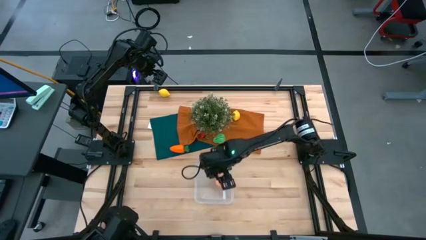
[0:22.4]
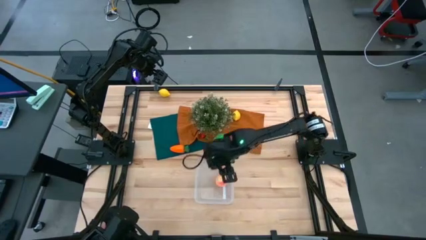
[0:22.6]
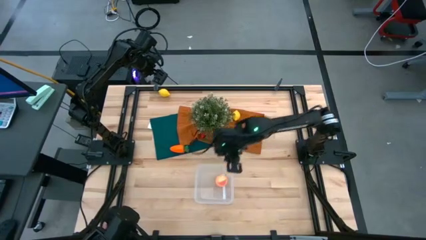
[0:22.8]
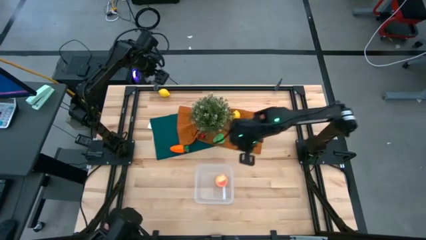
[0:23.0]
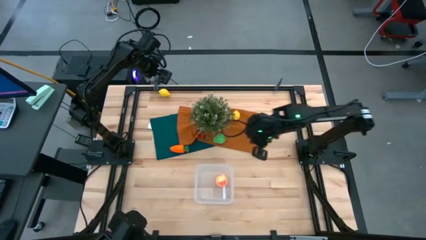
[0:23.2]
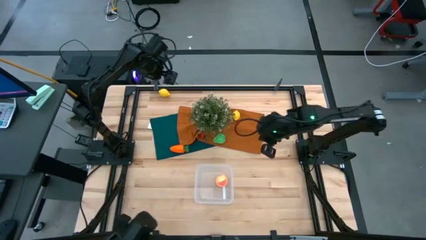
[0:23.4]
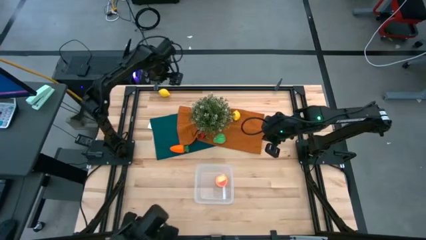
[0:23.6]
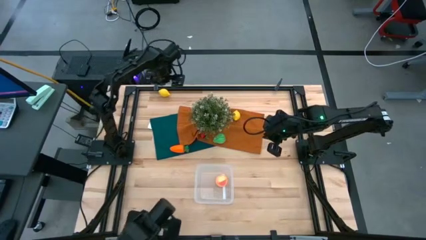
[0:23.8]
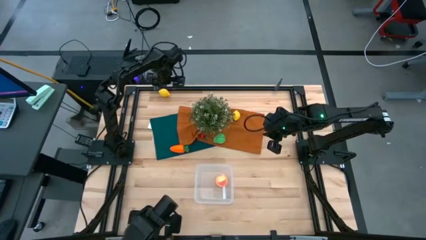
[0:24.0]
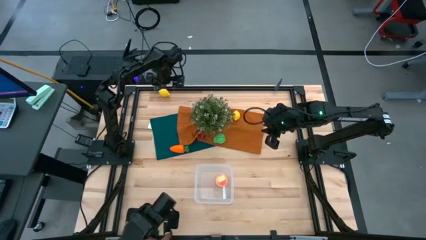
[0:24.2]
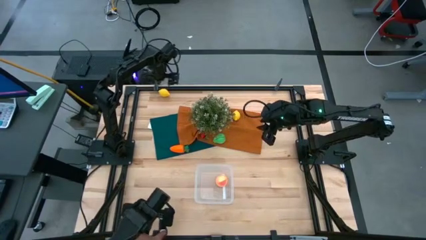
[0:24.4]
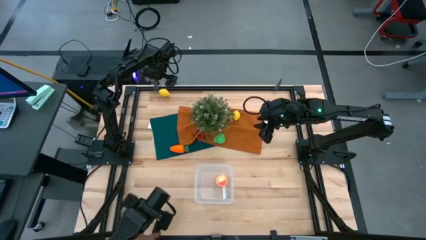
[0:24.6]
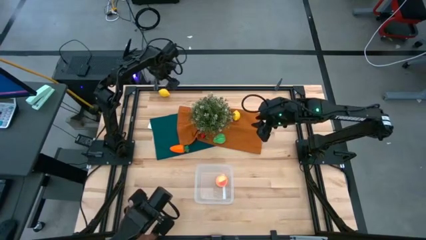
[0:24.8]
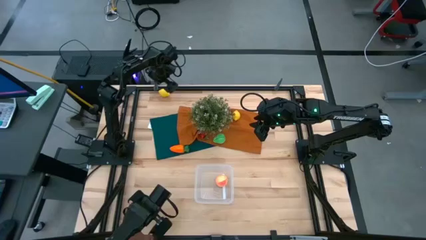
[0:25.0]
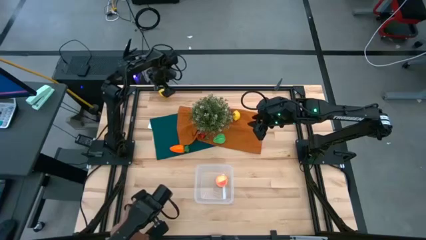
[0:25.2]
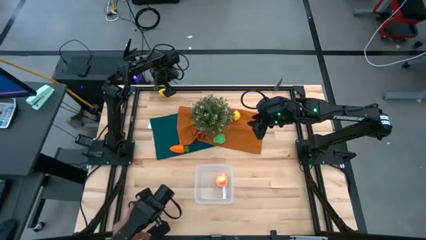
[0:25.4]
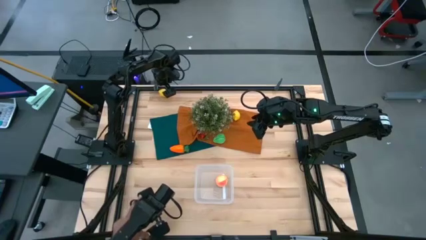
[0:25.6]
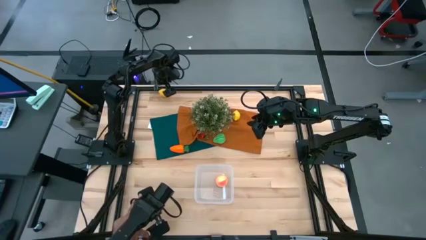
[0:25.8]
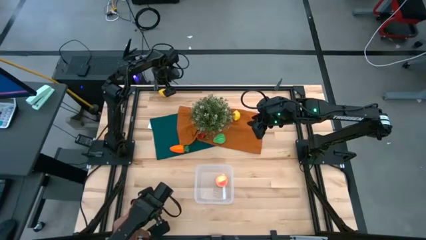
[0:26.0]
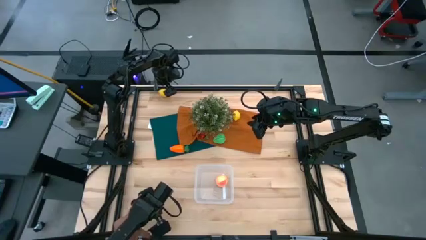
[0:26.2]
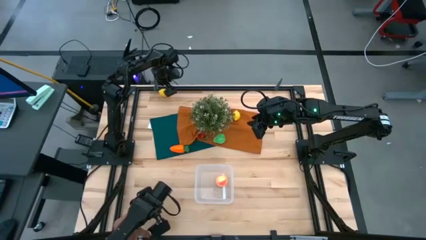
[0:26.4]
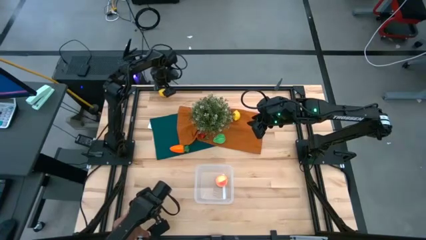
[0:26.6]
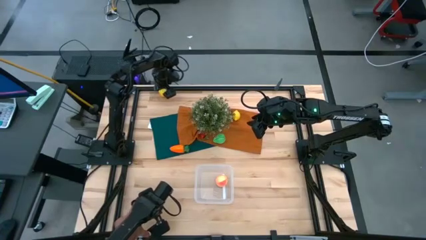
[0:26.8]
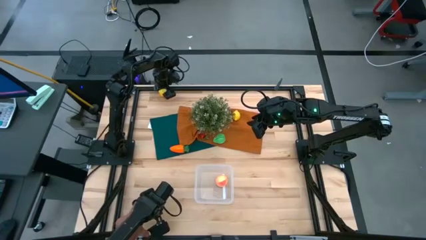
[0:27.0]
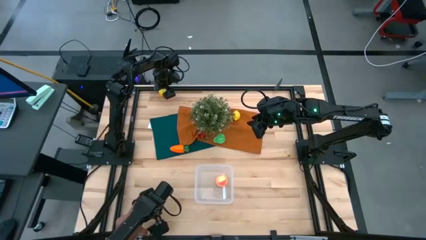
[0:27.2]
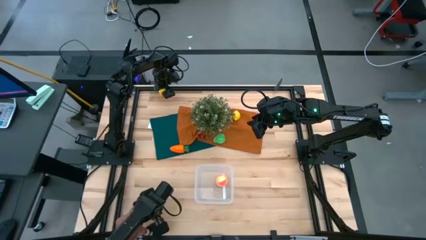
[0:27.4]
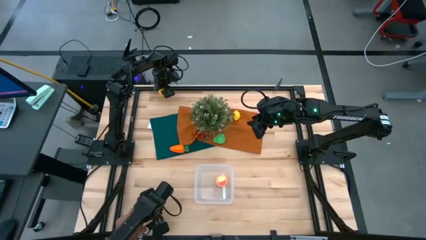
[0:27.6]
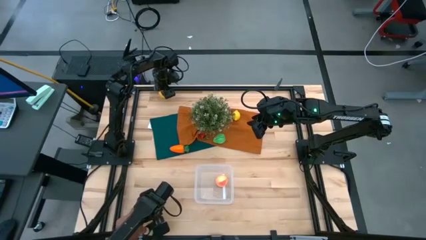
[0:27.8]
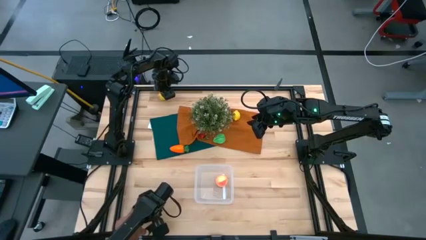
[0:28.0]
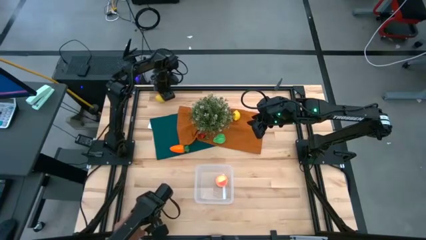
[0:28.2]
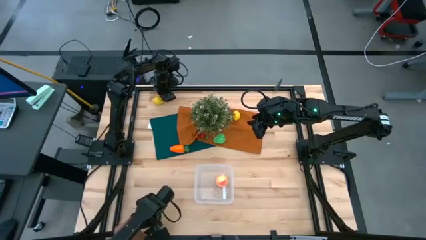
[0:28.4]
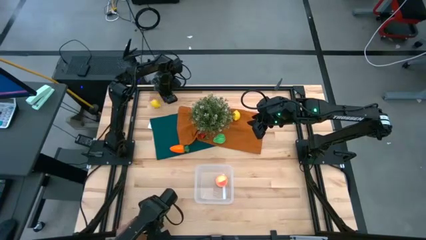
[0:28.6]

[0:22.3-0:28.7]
Task: Pick and placing Produce into tupperware
Put the top lemon into the transparent bin

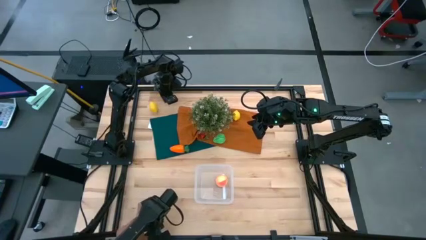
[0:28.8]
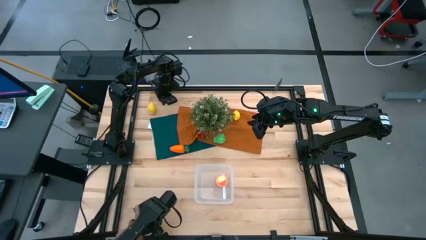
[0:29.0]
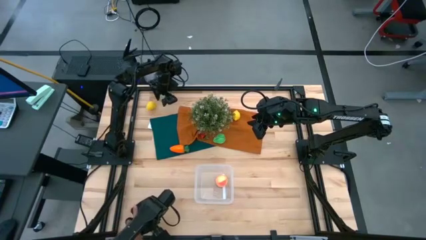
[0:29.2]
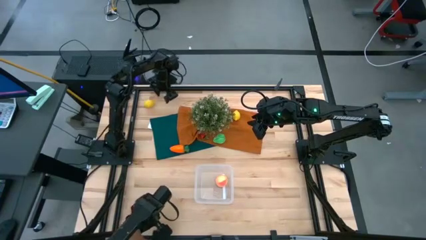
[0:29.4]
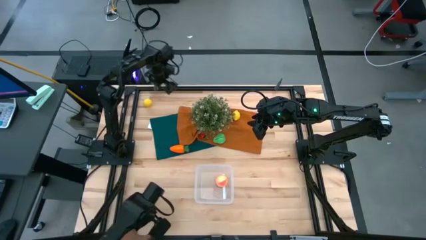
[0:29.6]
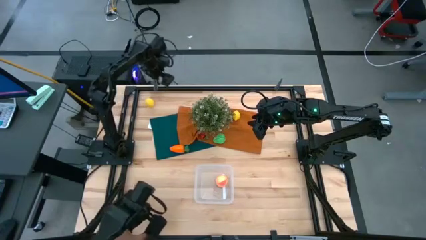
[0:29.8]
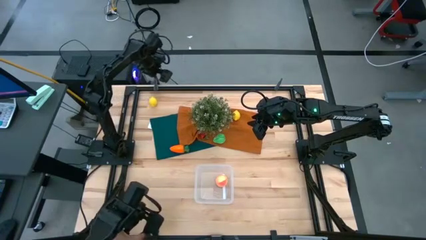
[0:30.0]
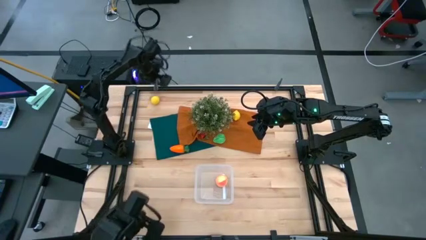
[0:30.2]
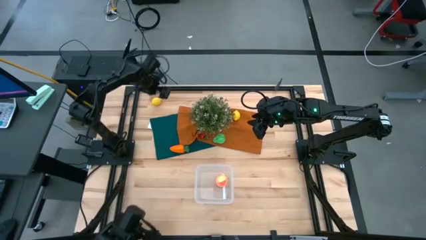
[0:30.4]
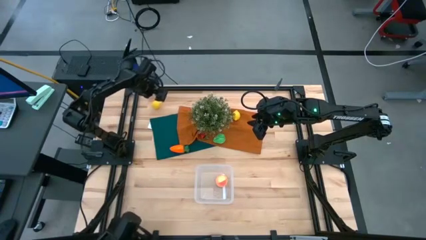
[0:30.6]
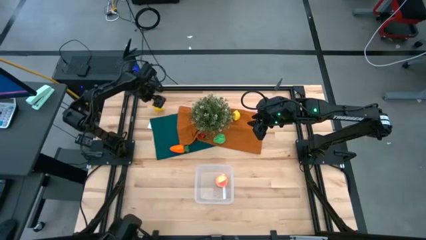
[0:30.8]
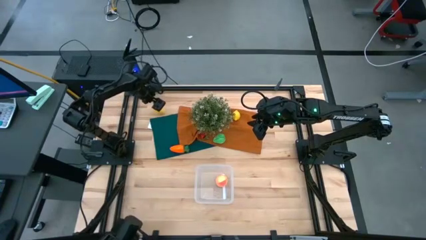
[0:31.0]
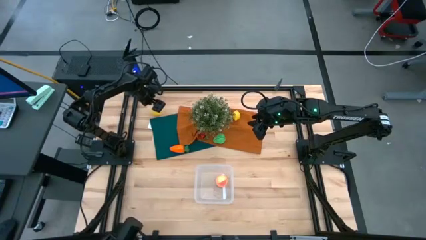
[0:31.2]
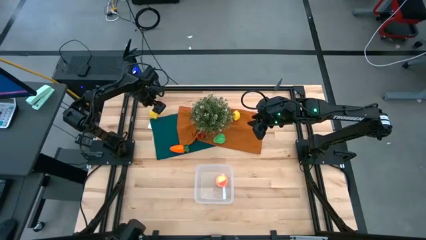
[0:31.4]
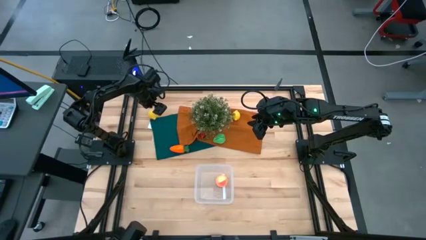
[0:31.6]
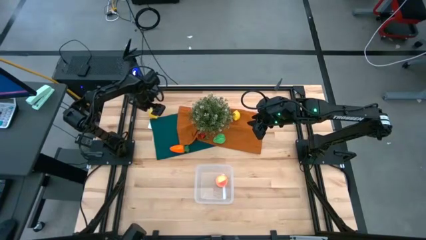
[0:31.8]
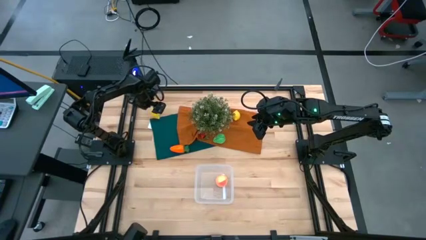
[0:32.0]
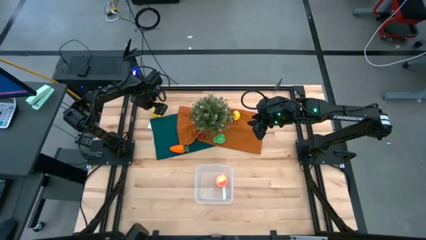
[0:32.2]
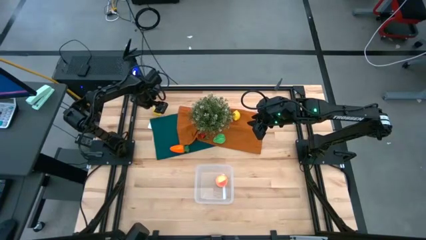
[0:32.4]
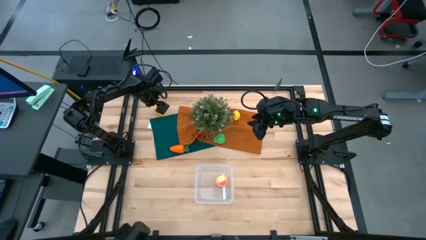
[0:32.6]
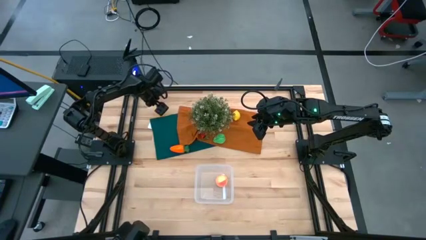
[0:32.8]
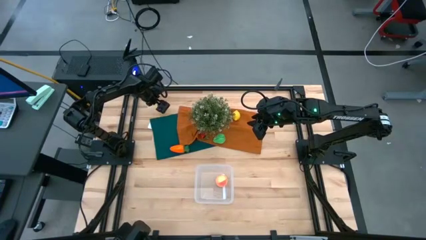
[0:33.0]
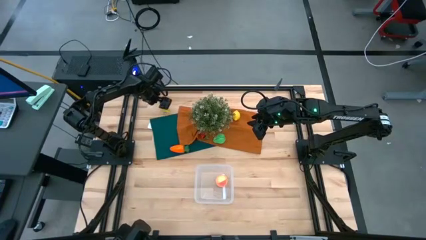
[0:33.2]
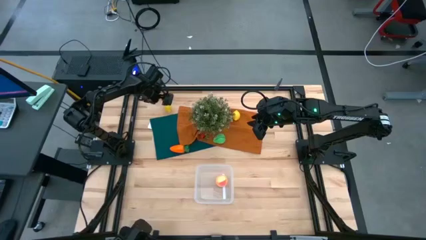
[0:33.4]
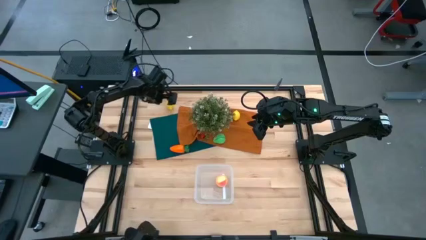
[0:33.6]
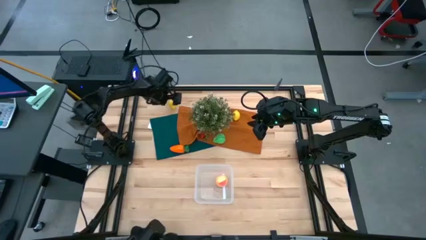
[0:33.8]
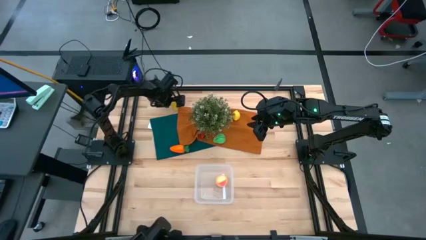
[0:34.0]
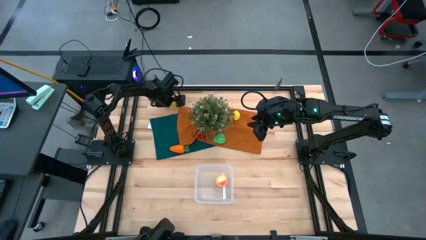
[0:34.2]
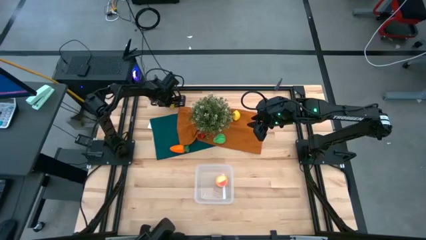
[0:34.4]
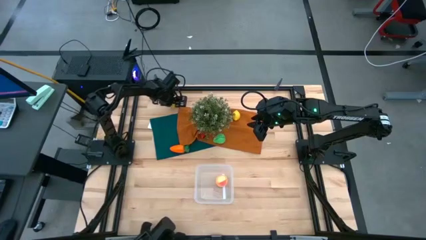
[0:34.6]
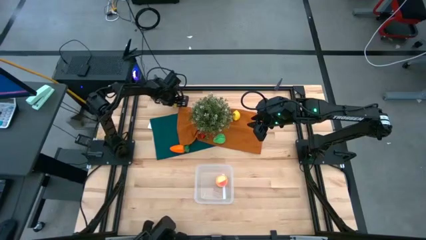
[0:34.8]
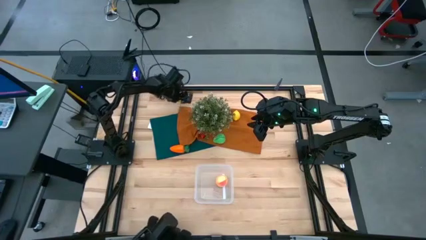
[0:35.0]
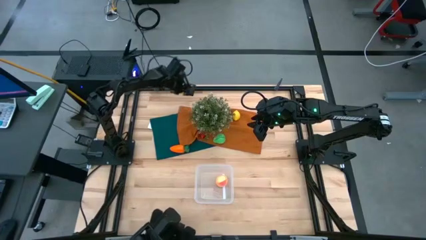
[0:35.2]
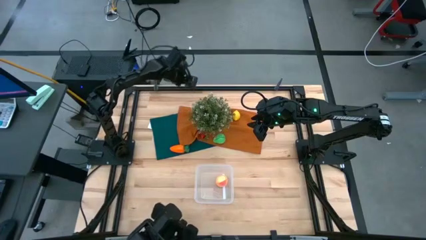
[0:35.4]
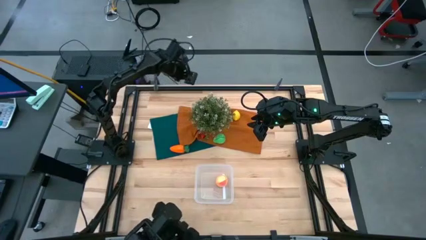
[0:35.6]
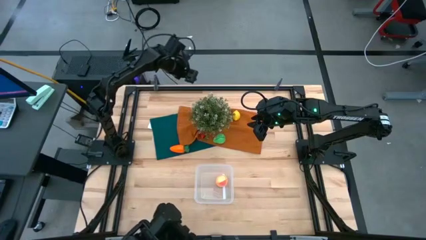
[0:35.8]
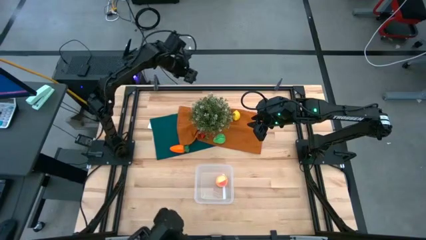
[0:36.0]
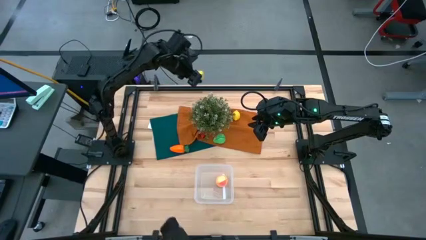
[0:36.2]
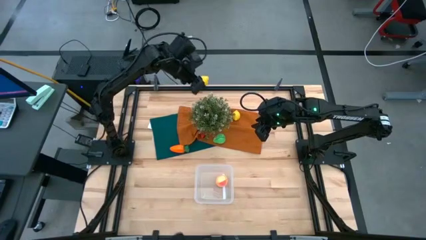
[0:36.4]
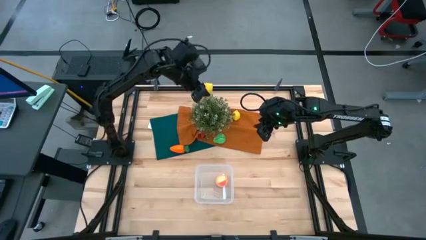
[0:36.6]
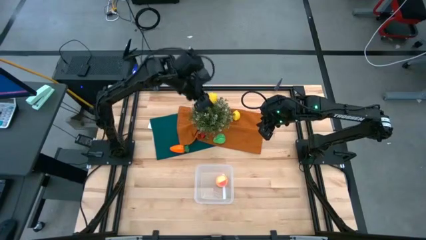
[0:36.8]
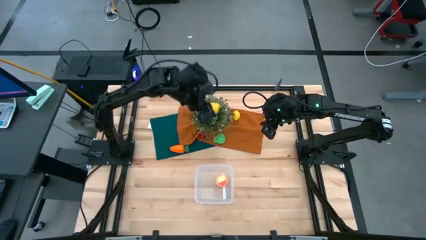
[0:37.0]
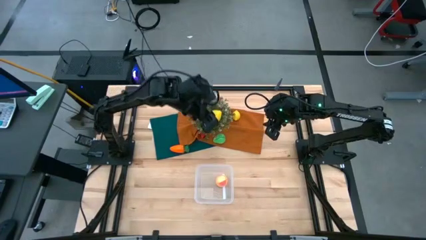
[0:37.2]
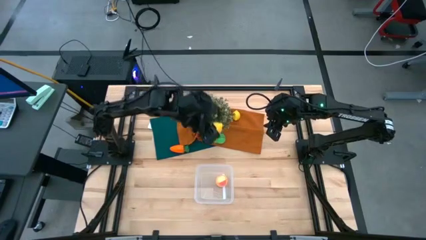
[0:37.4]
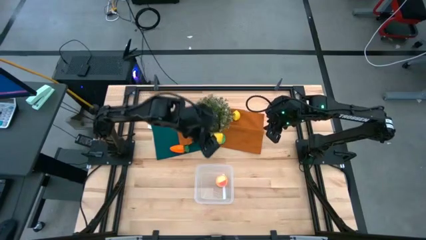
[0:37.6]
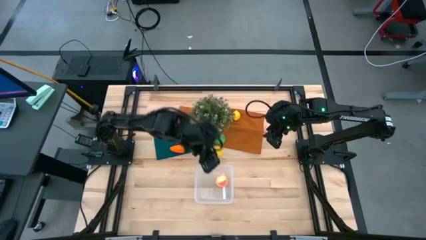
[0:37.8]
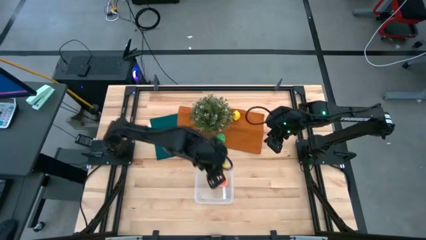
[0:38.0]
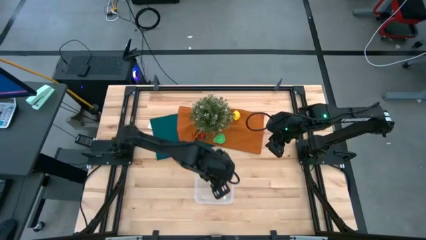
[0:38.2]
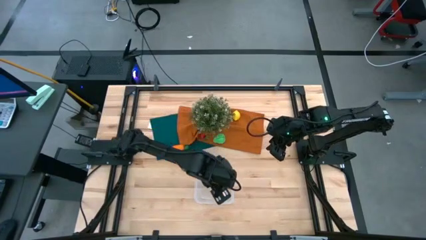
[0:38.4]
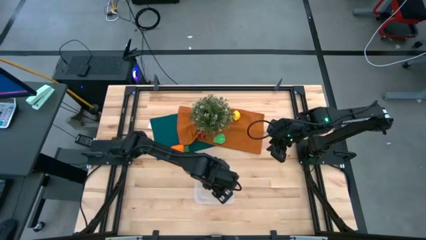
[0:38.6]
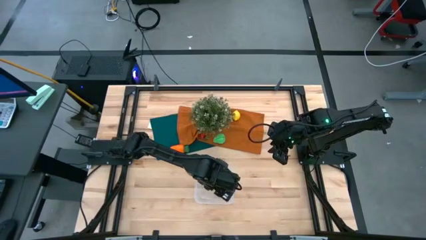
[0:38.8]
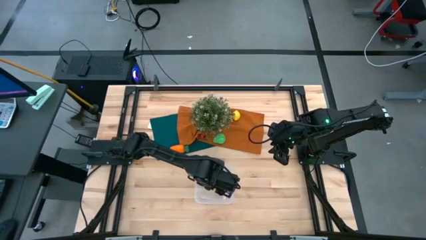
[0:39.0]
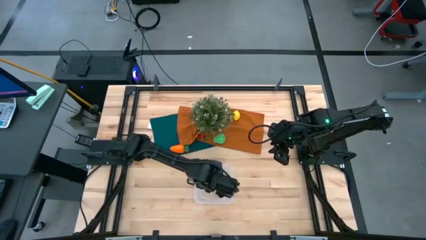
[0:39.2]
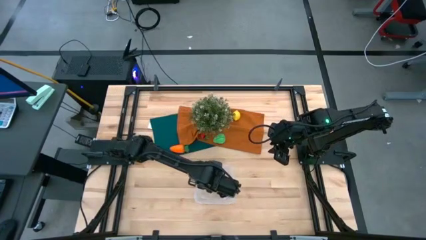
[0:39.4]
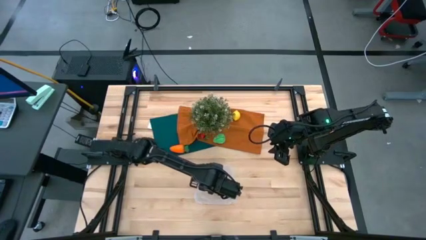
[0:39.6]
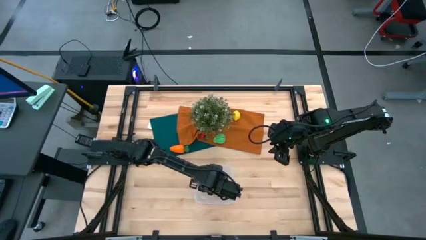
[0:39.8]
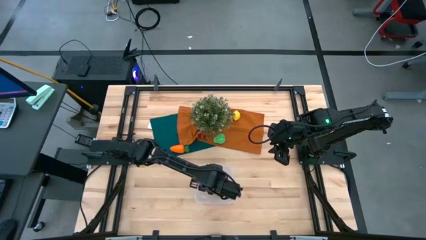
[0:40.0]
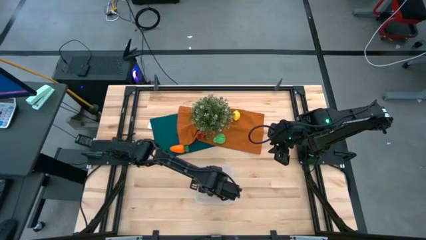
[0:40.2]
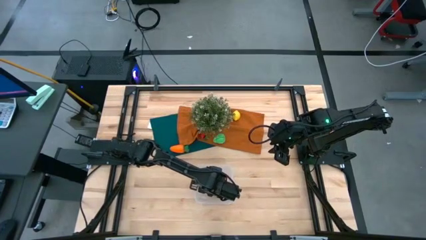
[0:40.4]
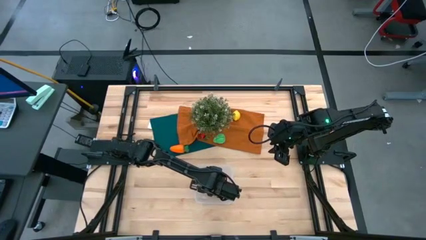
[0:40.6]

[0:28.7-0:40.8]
Put the left lemon into the transparent bin
